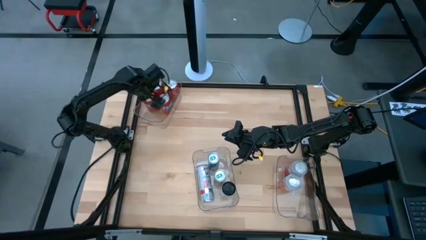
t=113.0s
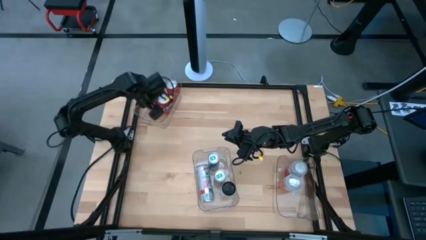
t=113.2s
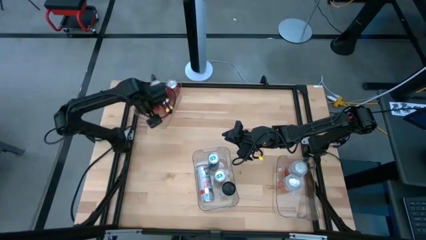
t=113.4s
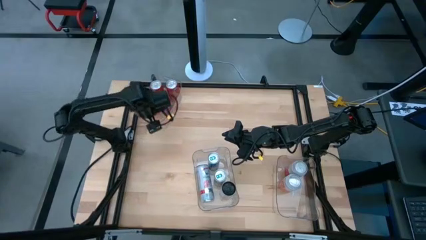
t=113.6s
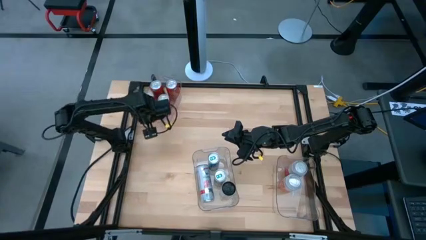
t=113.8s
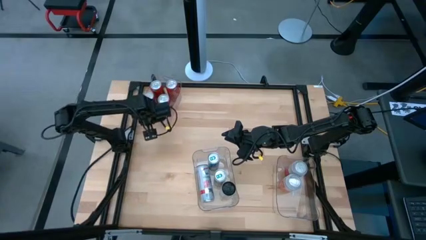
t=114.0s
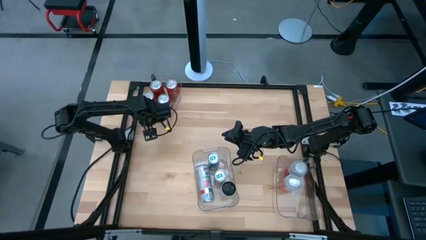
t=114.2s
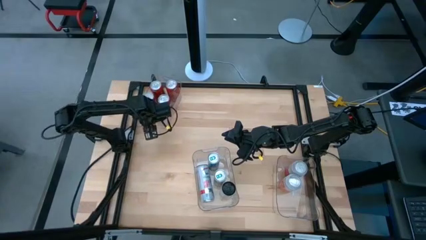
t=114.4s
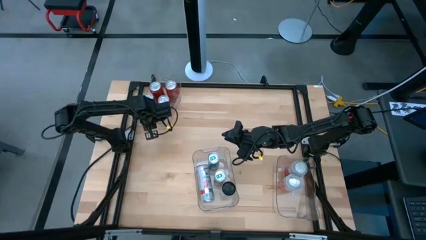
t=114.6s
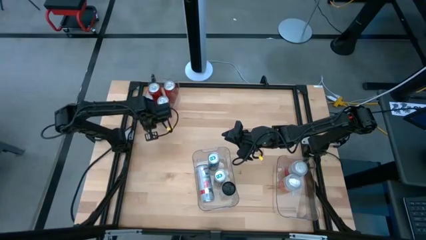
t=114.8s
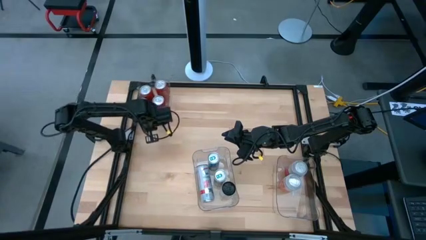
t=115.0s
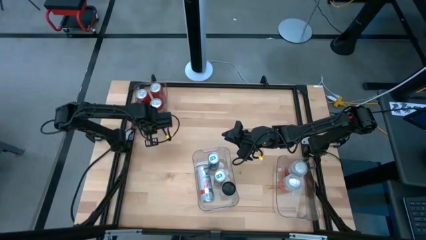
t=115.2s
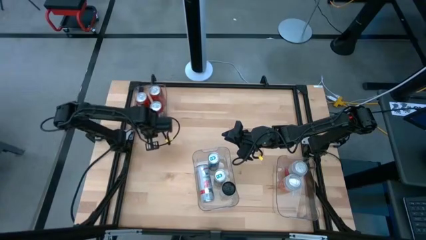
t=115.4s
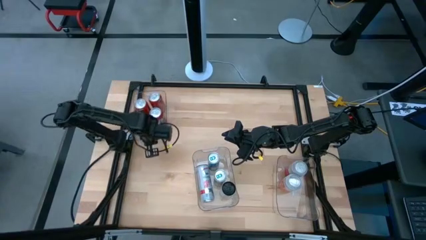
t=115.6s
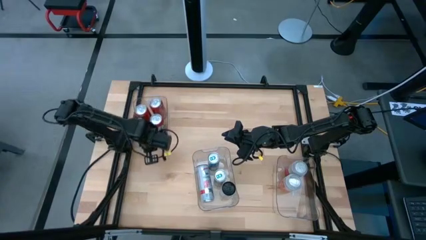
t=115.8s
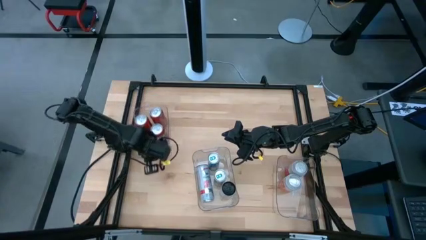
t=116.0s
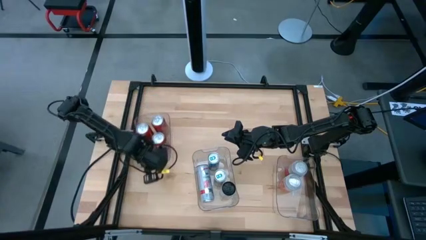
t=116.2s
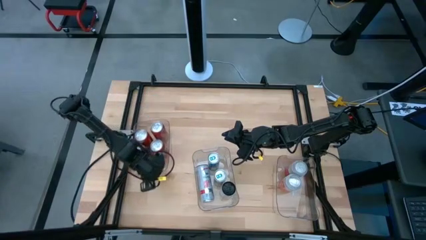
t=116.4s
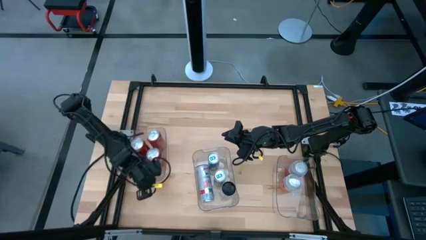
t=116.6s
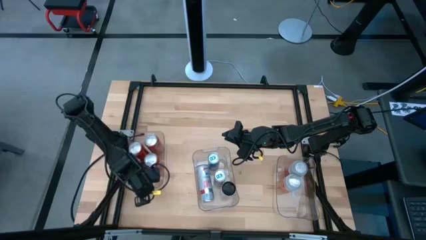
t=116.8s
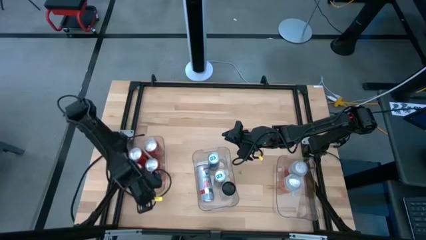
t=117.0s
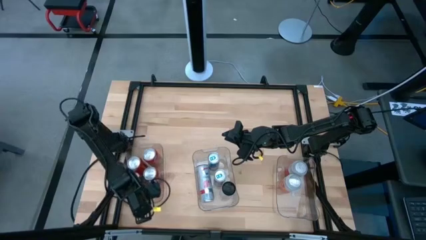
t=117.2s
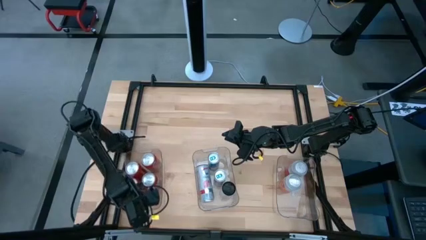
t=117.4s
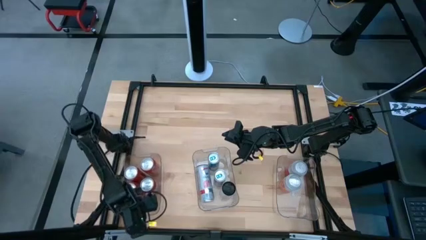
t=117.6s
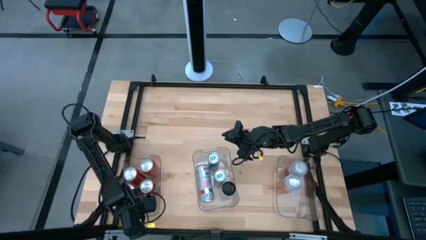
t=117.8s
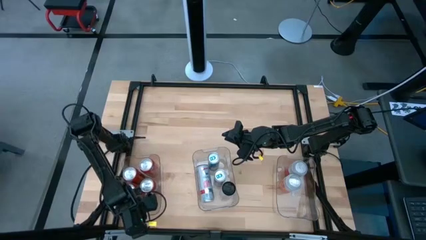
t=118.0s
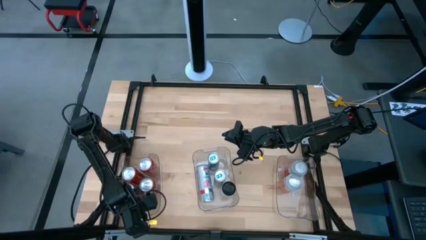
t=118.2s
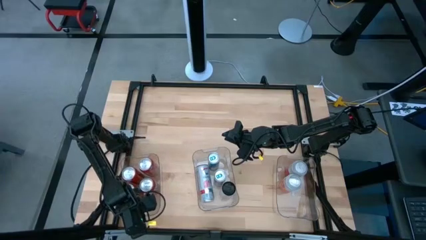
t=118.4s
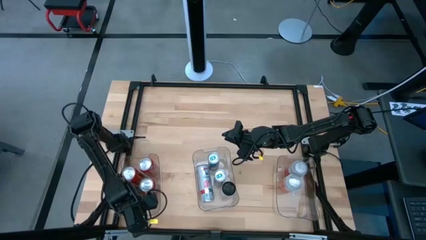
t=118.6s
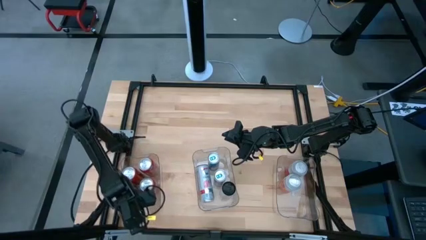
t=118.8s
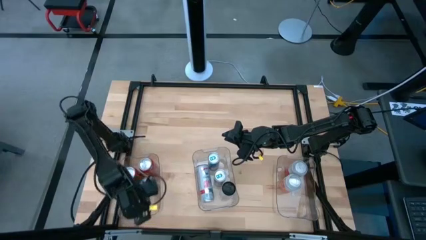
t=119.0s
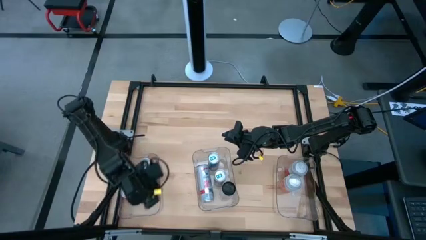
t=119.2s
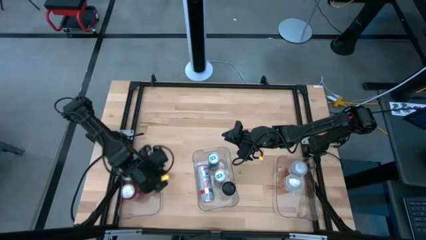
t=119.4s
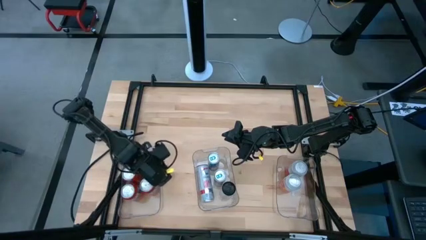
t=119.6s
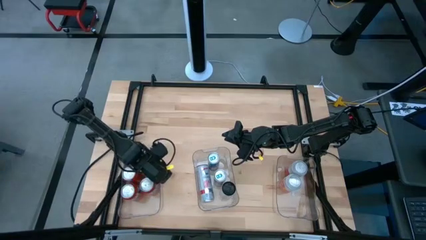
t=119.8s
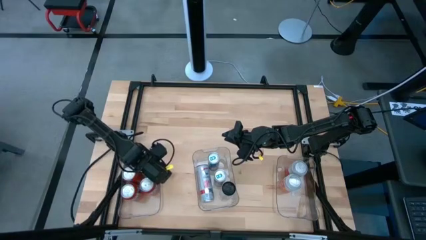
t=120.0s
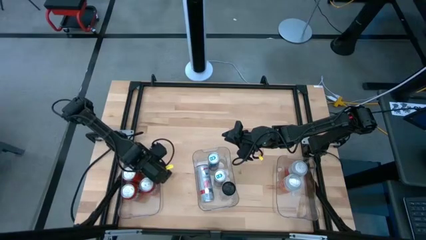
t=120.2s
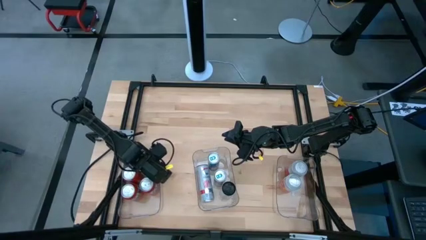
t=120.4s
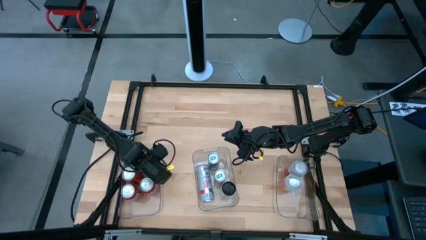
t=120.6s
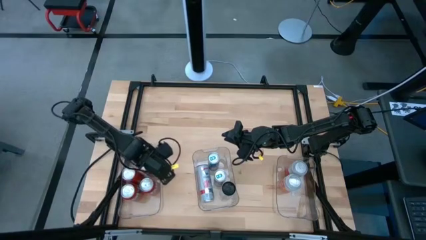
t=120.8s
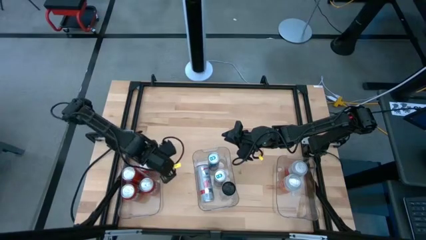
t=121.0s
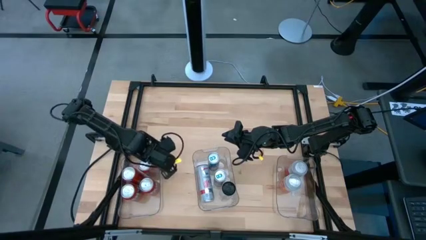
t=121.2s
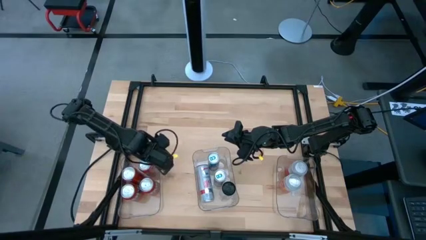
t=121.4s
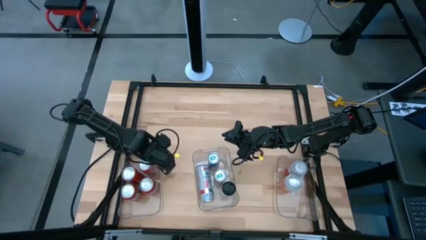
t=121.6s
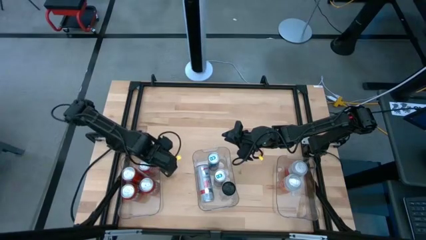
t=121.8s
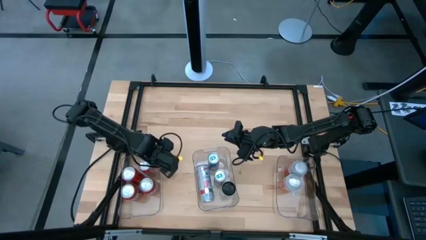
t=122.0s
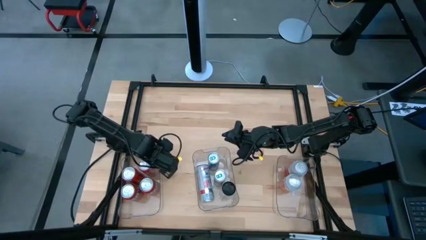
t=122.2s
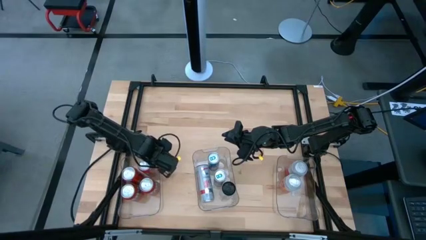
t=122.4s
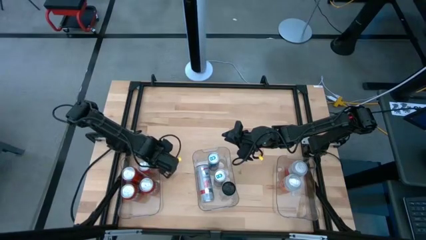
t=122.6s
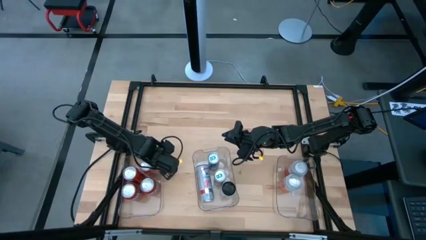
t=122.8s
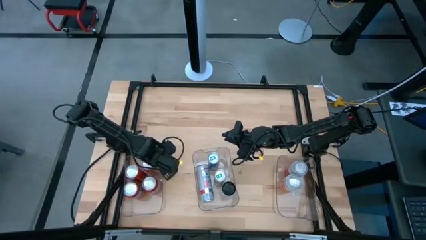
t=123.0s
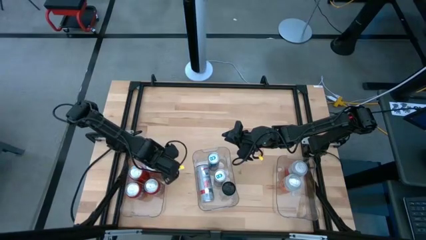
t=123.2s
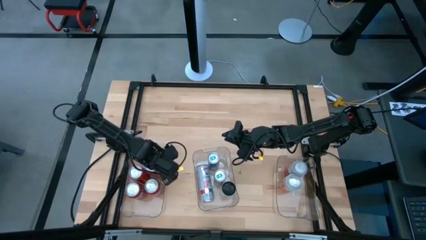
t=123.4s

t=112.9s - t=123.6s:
Task: Sort soda cans
Move the top transparent bin to the bottom left of the table

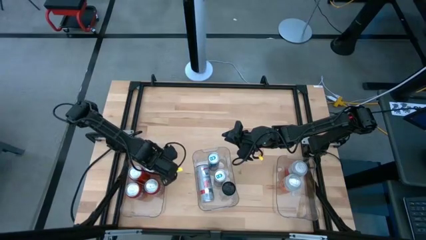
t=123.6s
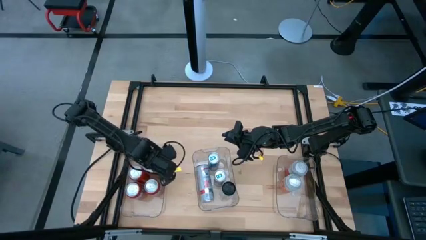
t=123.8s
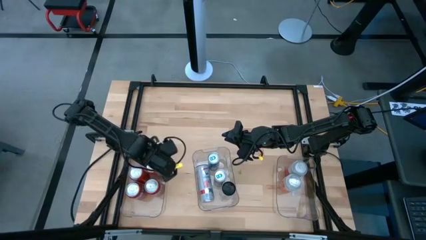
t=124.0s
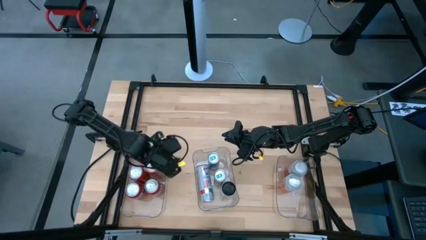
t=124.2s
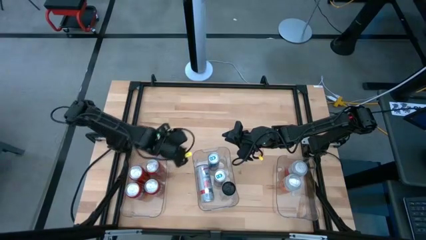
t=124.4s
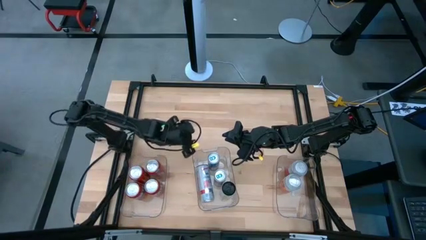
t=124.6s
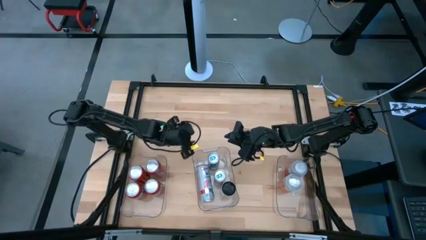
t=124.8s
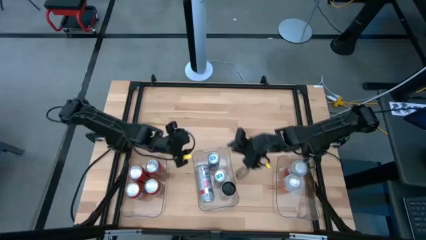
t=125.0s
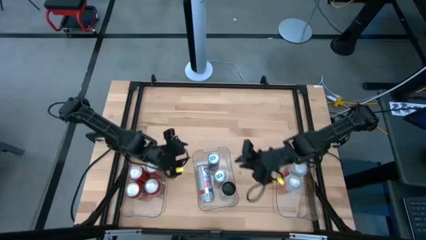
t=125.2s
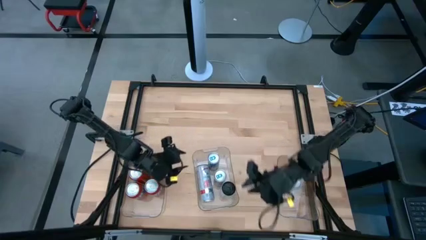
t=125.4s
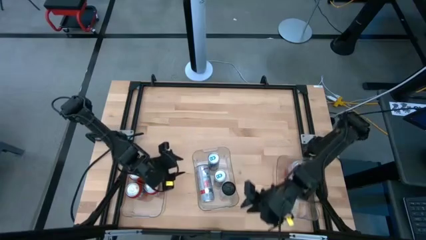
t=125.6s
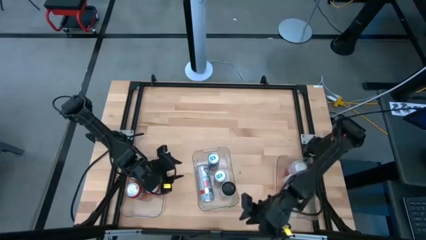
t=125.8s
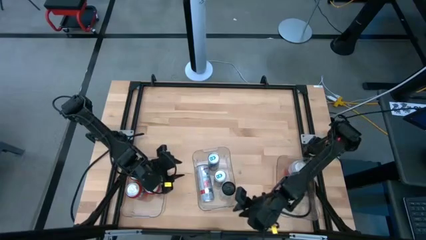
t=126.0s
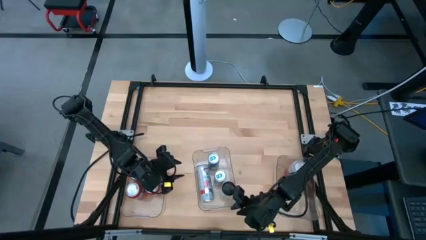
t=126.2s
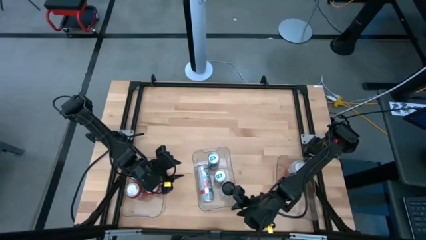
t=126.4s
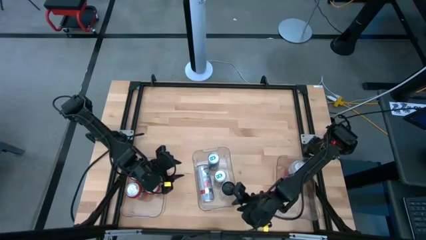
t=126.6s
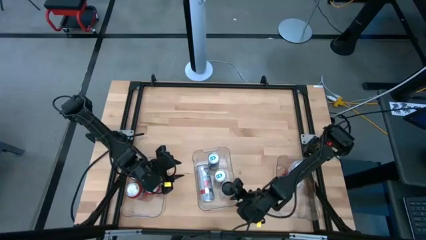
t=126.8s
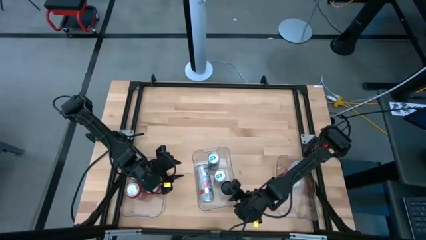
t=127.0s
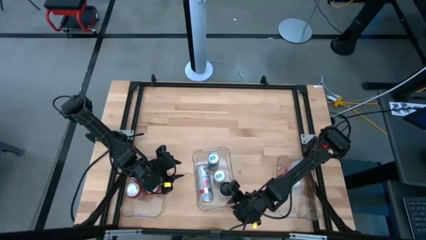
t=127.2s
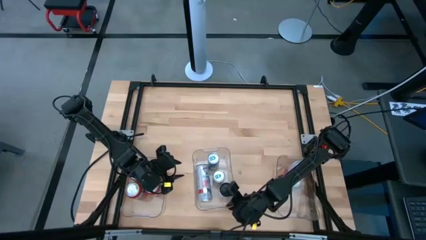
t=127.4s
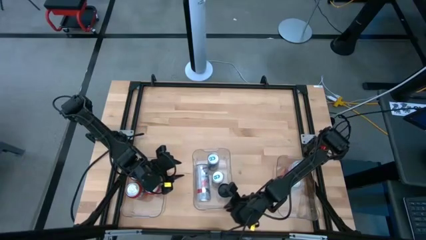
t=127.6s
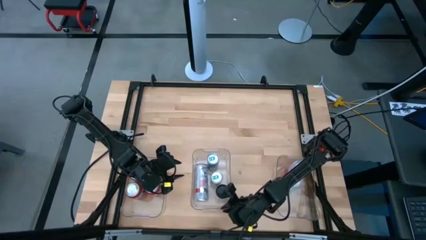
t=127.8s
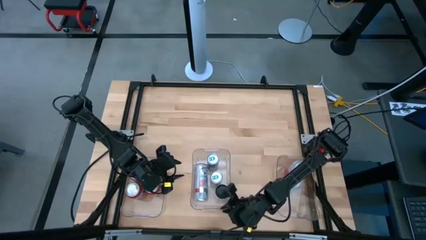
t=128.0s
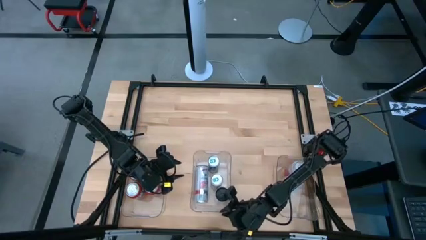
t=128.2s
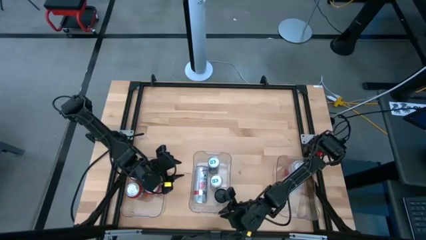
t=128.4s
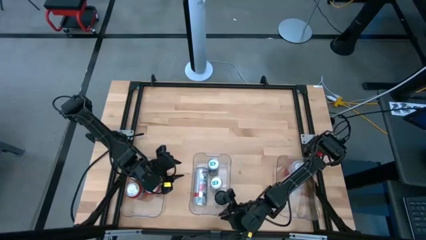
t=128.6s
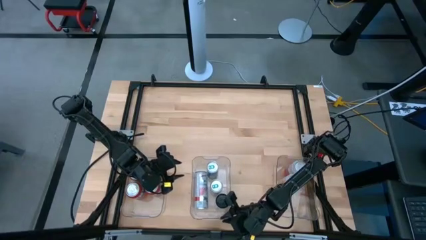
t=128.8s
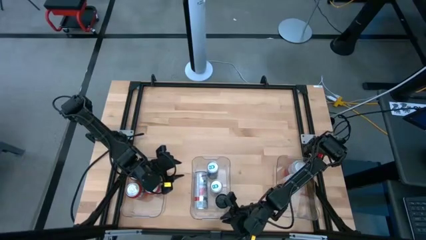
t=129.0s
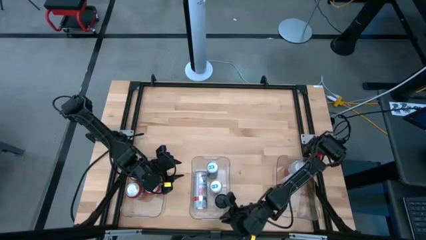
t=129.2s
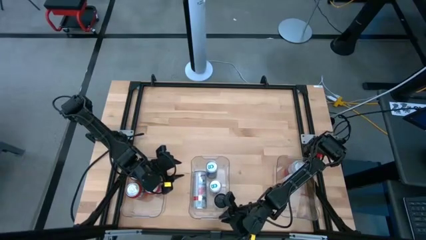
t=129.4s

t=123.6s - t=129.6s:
Adjust the middle transparent bin
